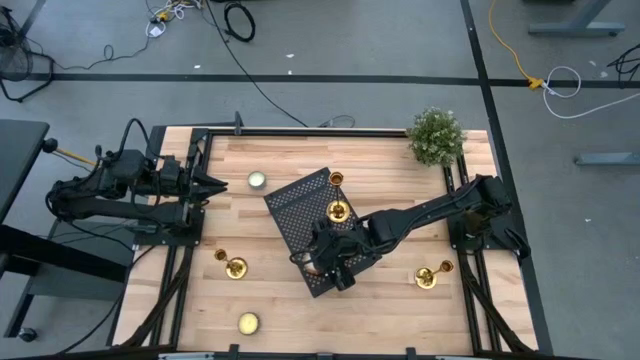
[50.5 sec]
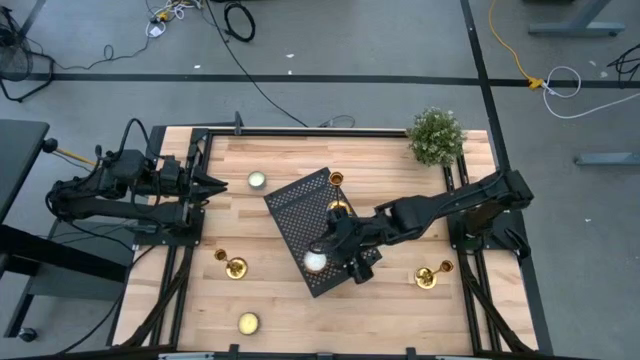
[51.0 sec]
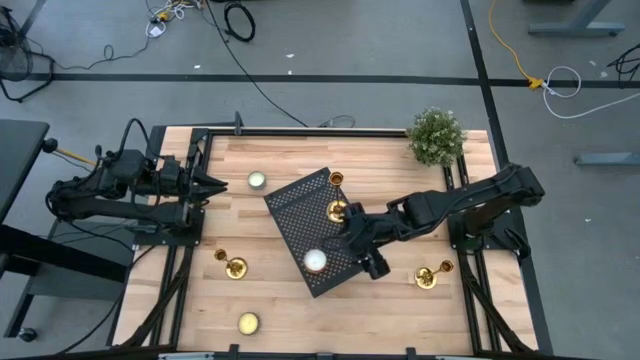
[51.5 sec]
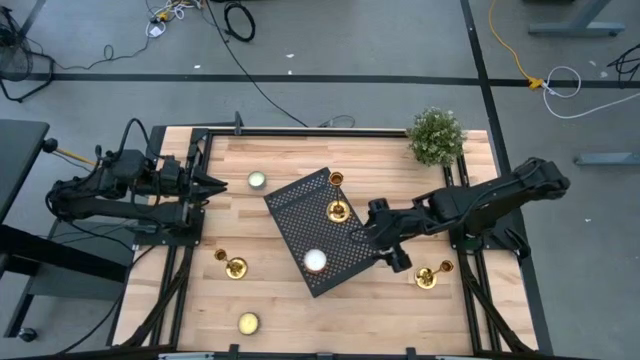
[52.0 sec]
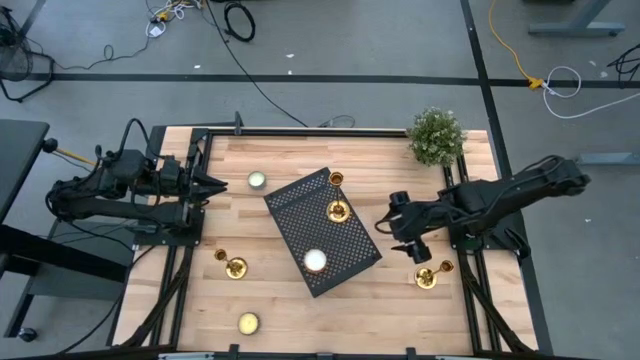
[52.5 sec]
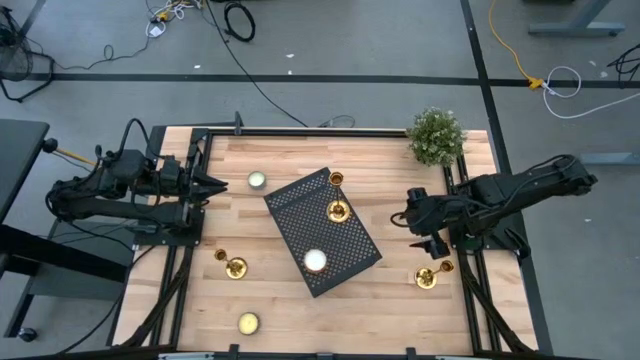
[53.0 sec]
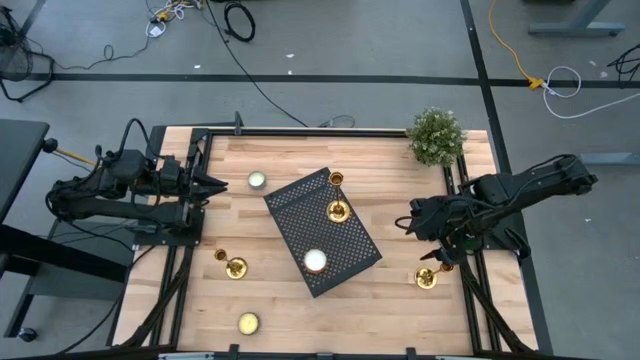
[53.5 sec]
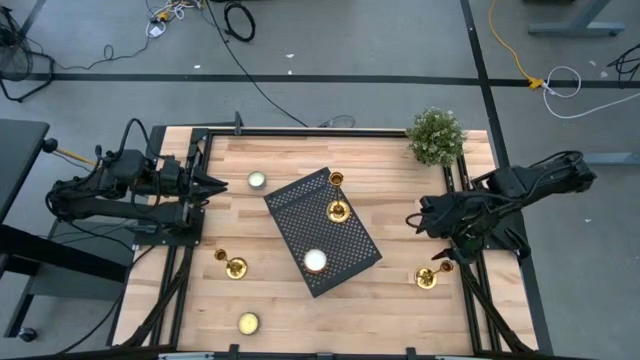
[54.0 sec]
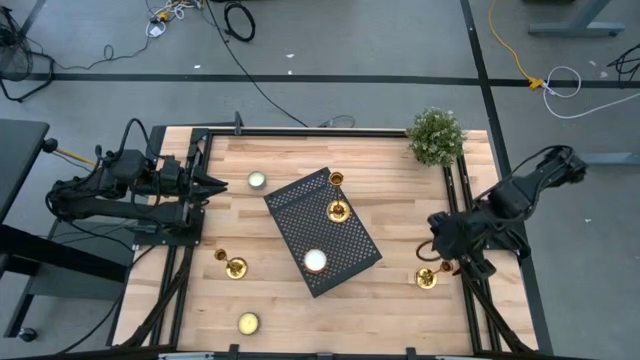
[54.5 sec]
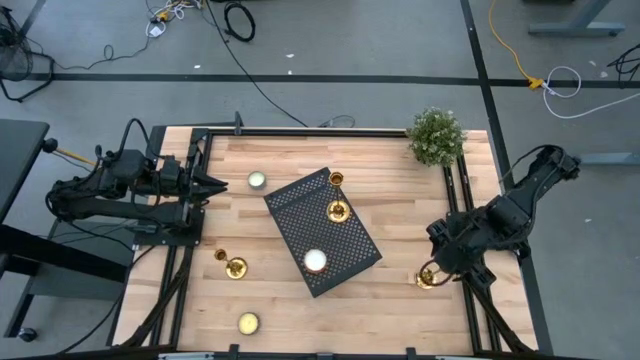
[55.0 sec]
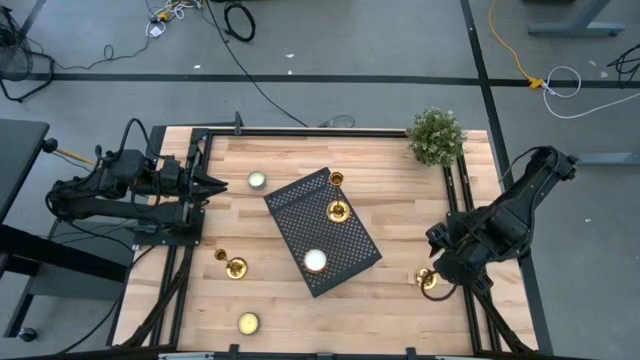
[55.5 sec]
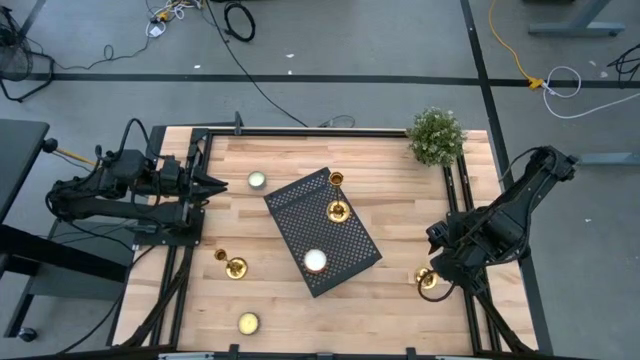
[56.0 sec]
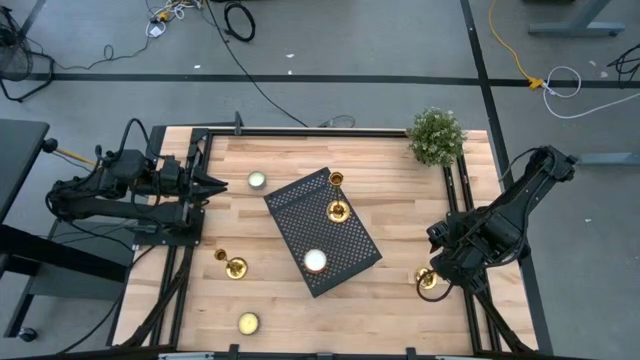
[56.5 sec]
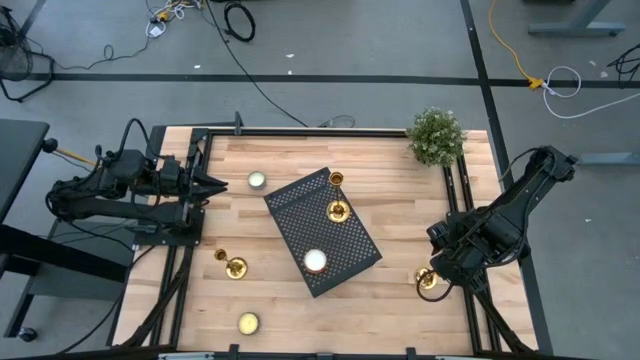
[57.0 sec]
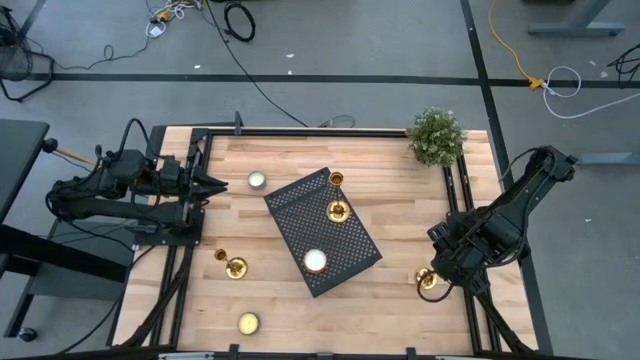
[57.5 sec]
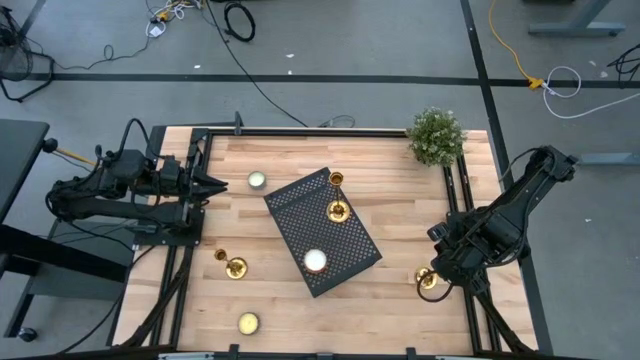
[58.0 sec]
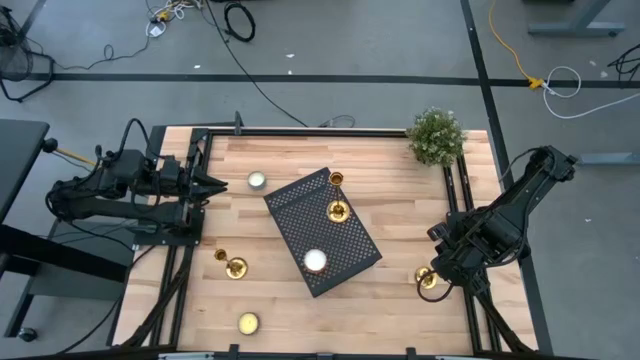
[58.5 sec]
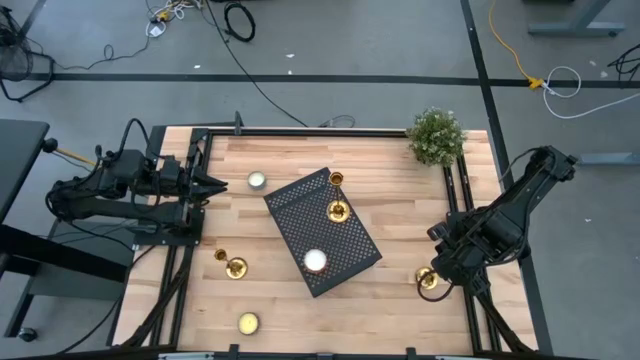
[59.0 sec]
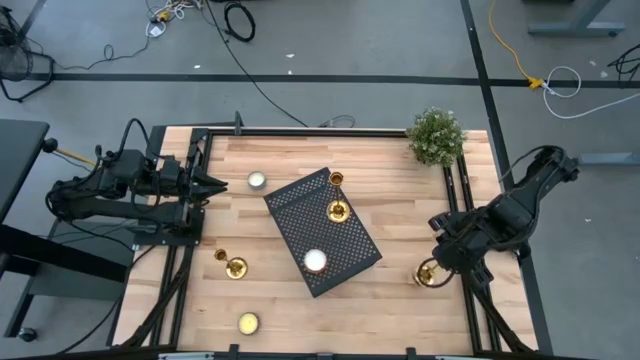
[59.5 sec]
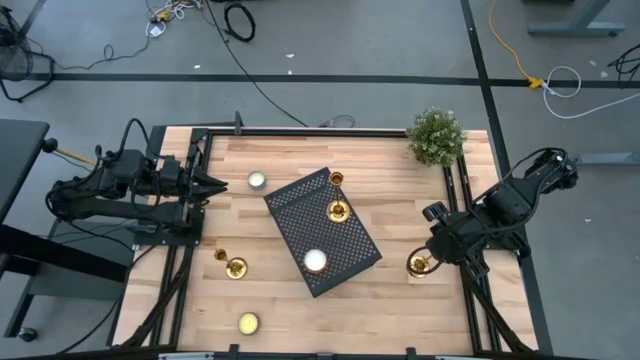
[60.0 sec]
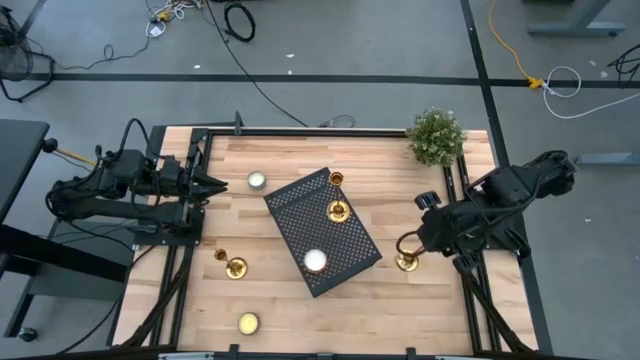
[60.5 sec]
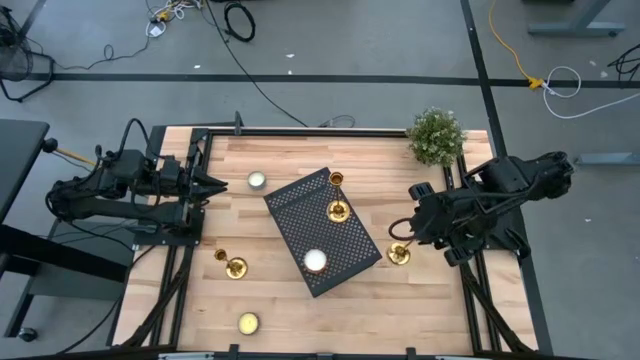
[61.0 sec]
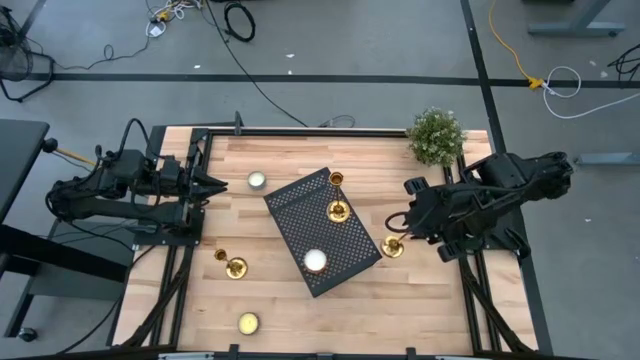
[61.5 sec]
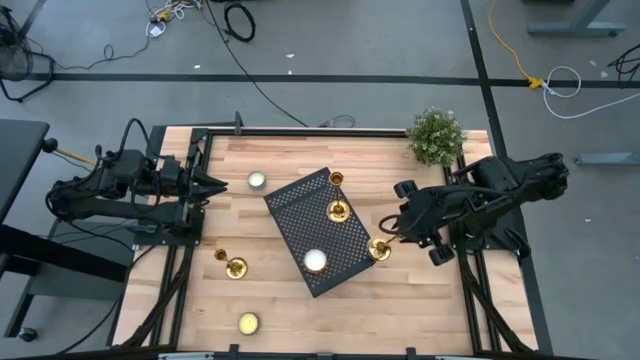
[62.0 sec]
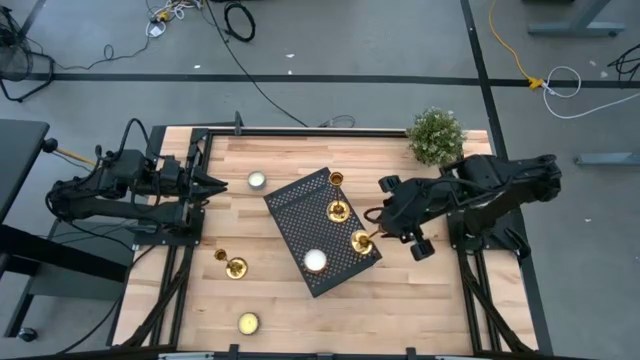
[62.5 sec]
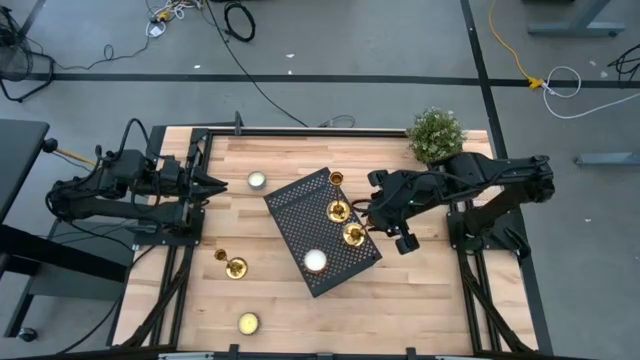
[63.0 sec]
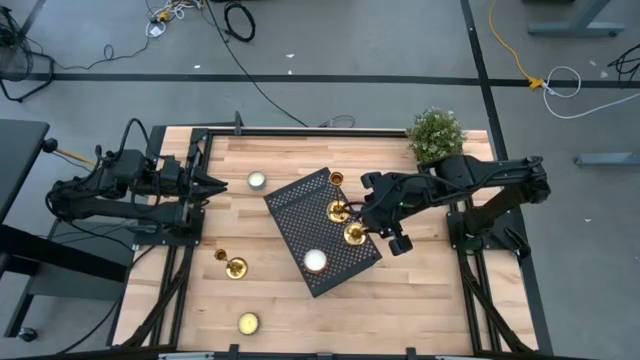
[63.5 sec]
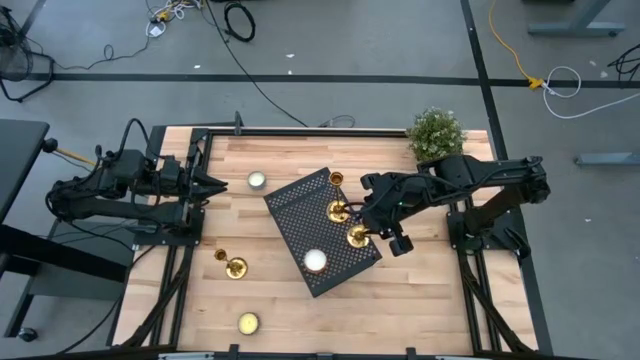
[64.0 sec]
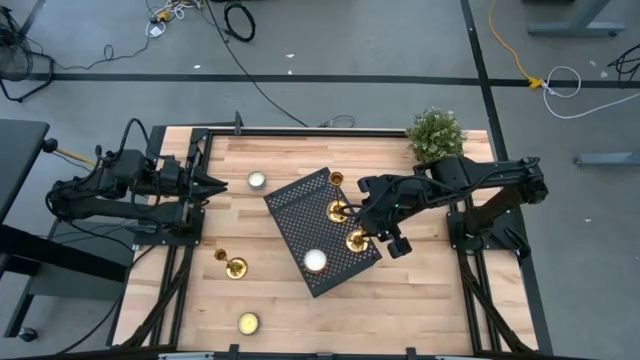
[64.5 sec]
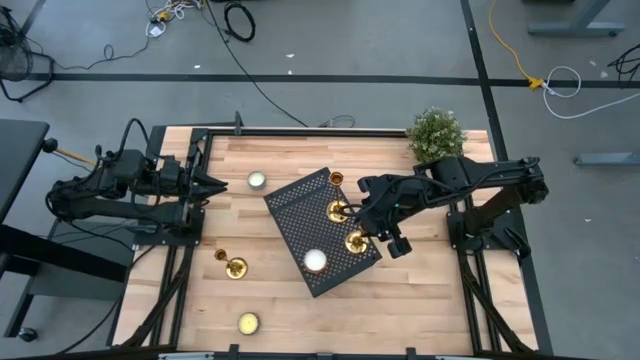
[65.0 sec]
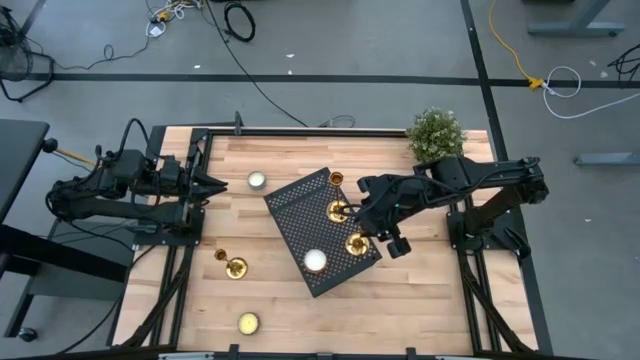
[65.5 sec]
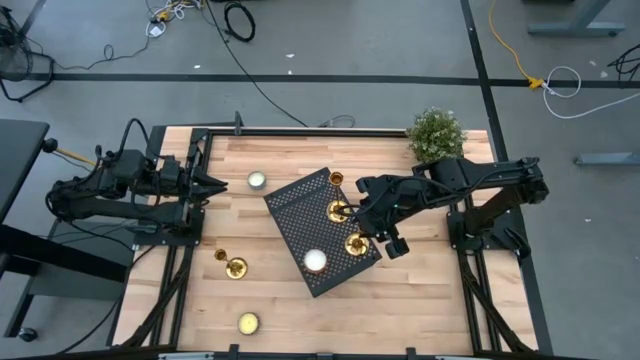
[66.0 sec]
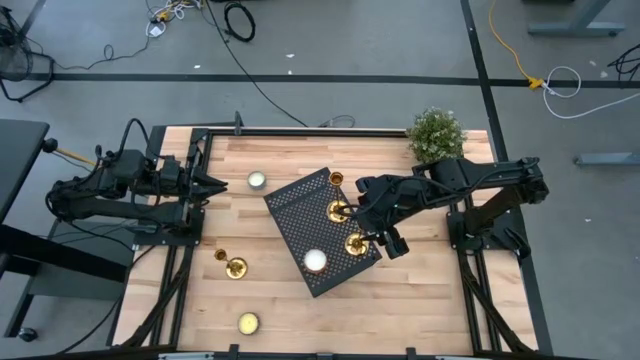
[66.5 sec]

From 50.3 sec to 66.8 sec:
Task: Pick & Place candle stick holders
Put the right gold candle holder on the shelf aligned with the other candle holder

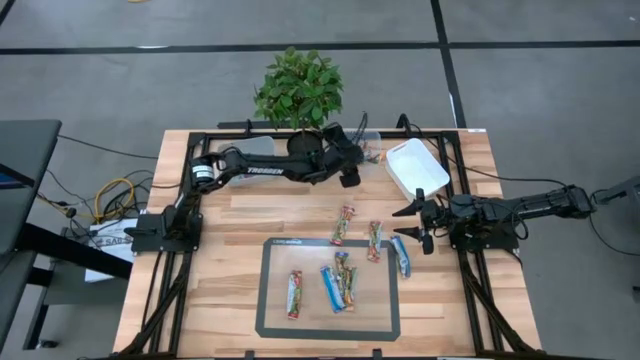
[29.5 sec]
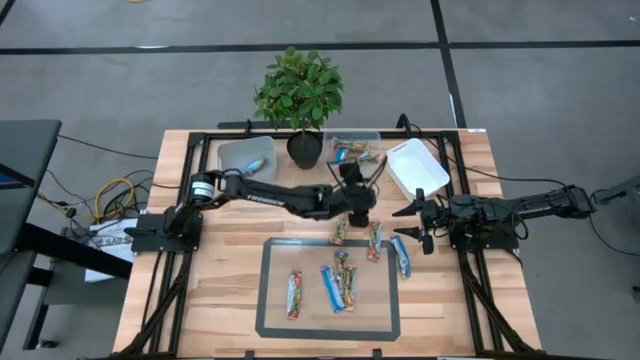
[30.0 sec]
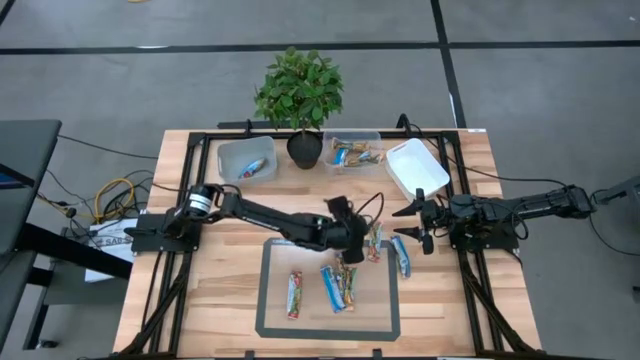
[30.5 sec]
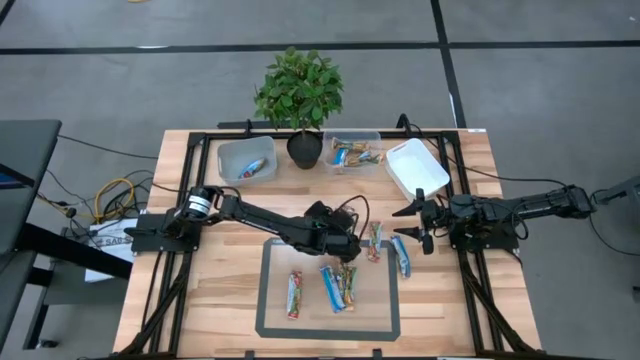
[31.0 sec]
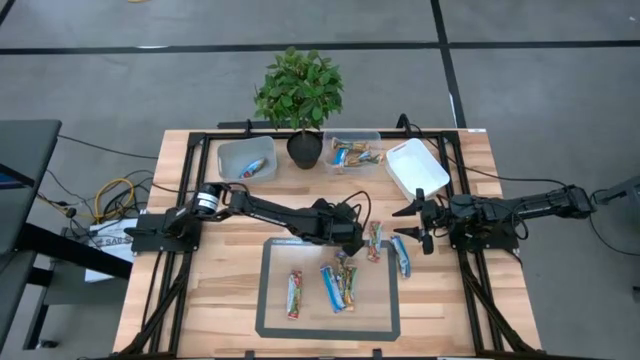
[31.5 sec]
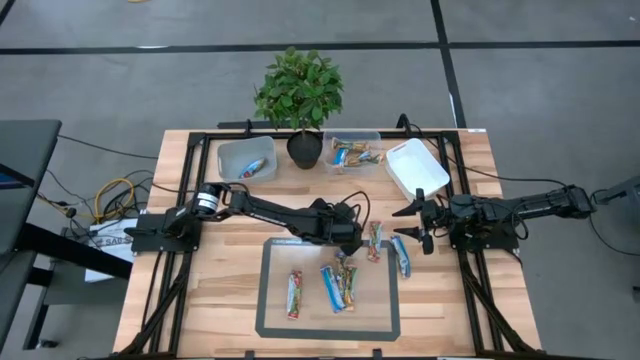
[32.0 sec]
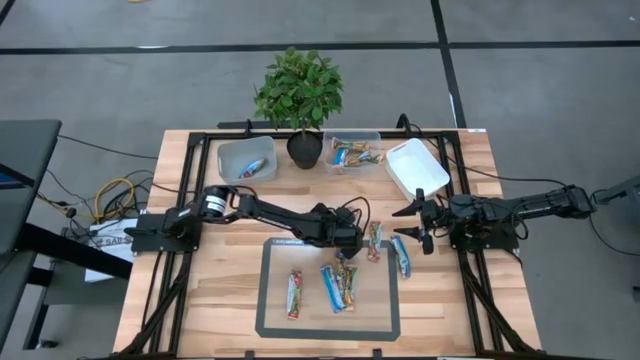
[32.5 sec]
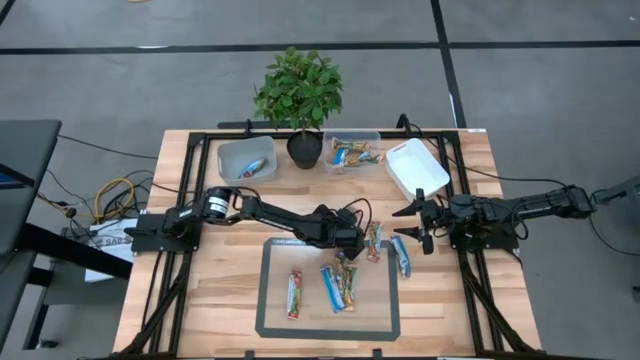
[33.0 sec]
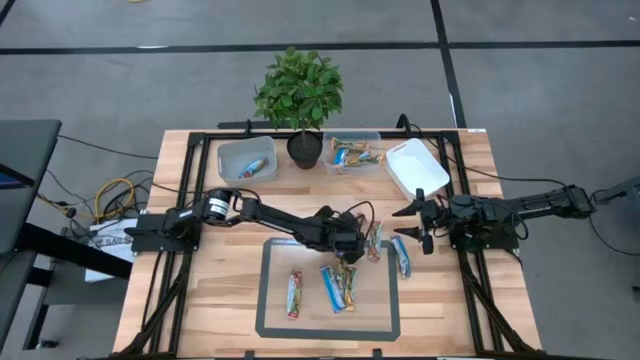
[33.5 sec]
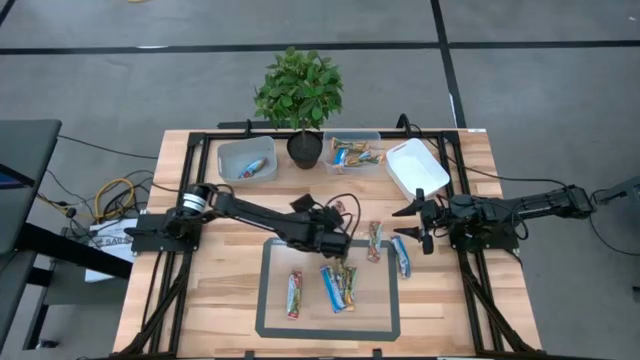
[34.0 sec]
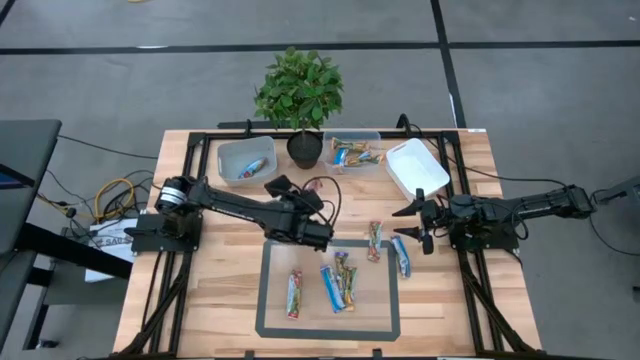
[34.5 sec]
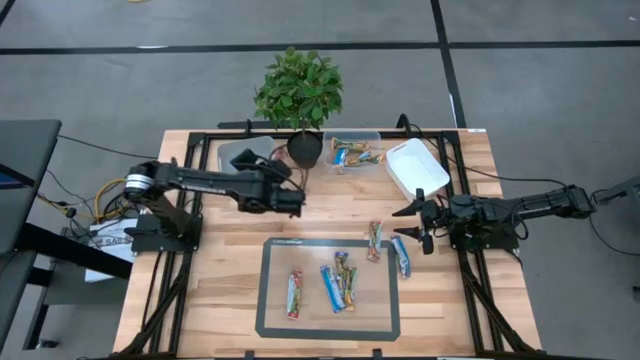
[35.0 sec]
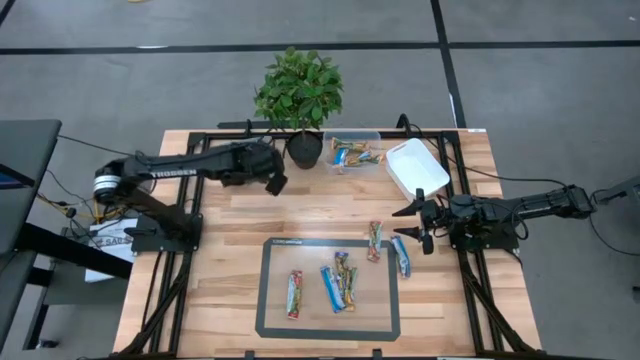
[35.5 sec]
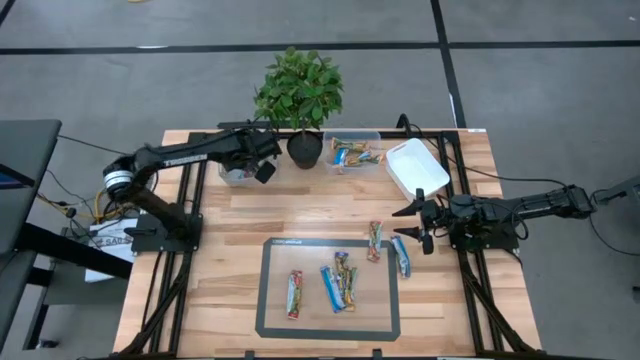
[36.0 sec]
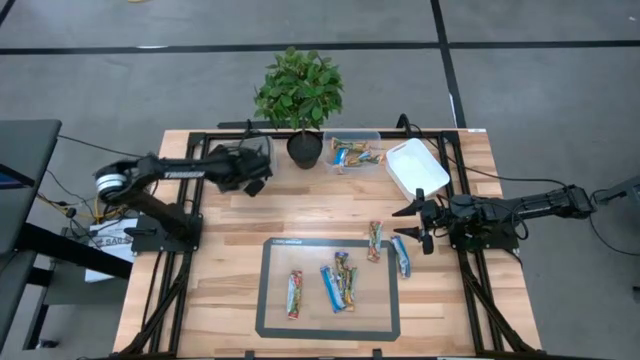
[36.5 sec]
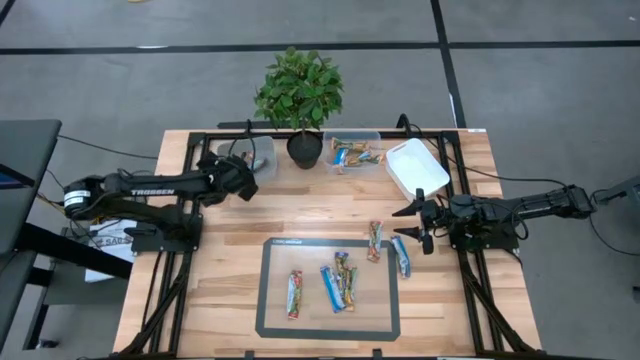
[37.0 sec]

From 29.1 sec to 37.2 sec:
Task: Pick and place Granola Bars by type
Put the red granola bar into the gray bin
